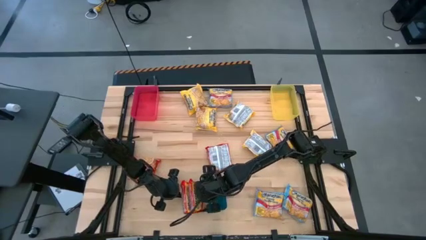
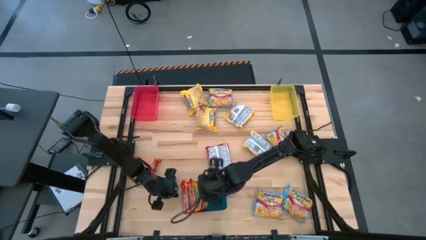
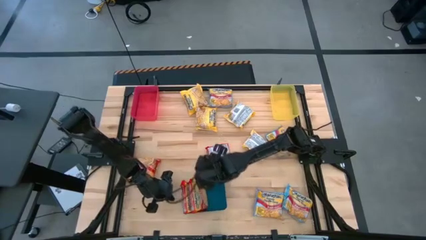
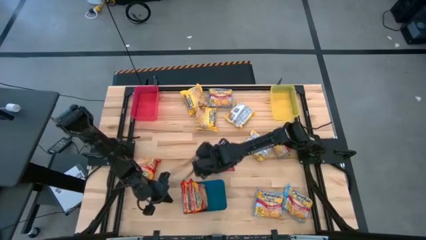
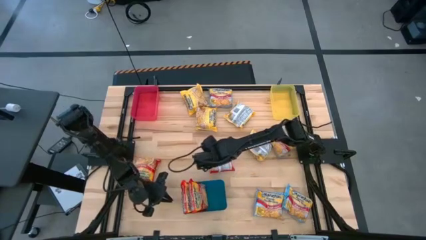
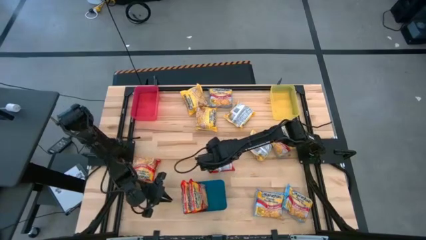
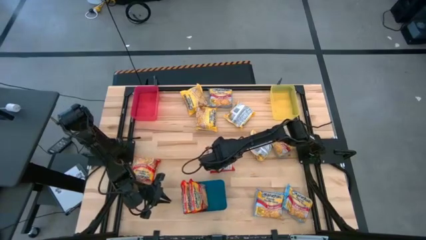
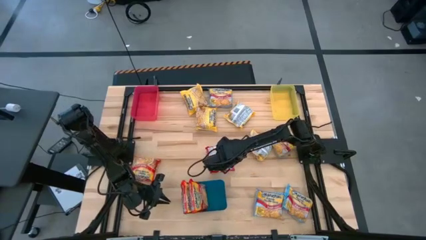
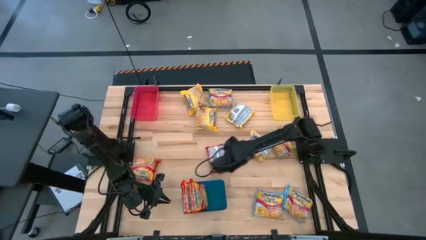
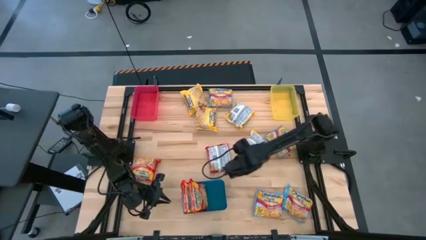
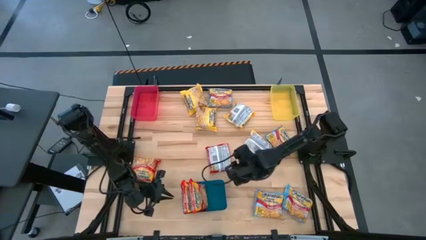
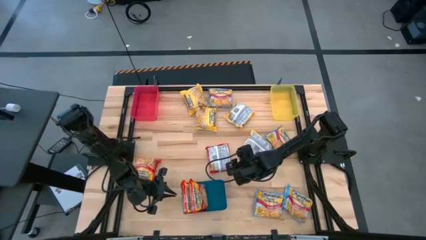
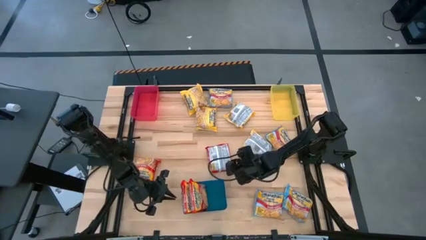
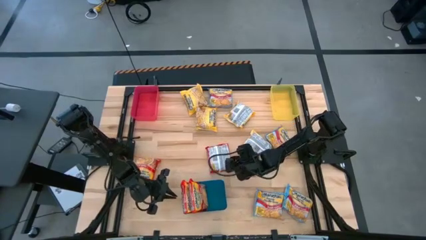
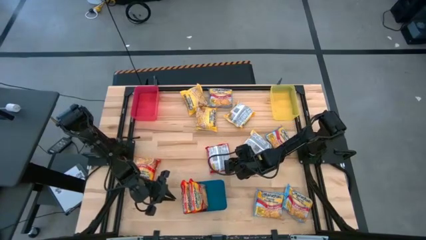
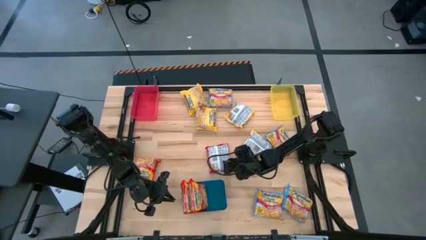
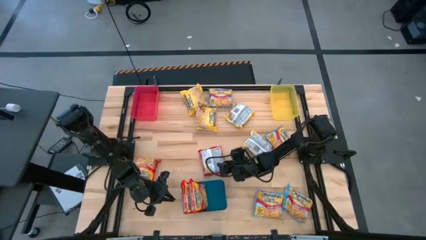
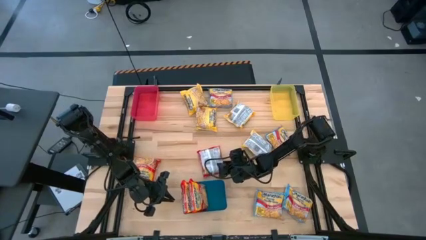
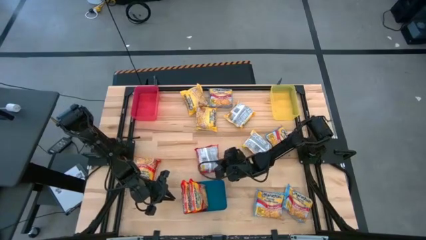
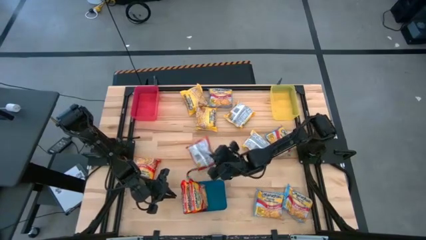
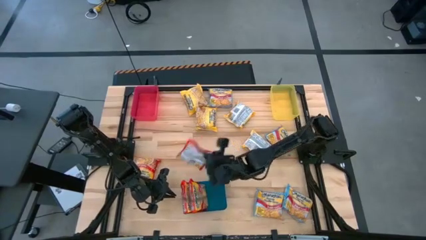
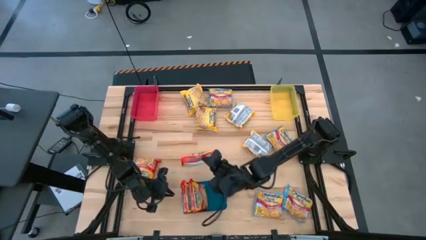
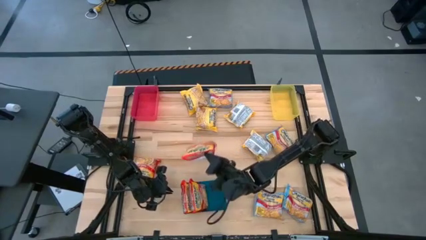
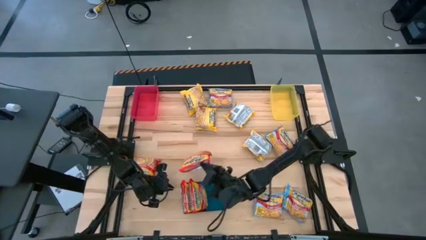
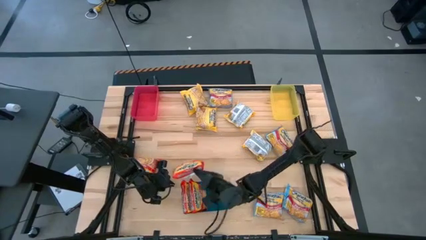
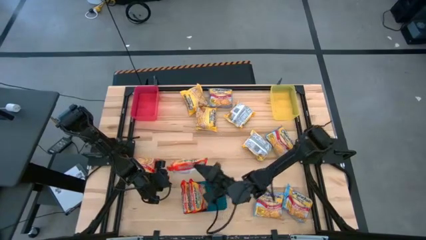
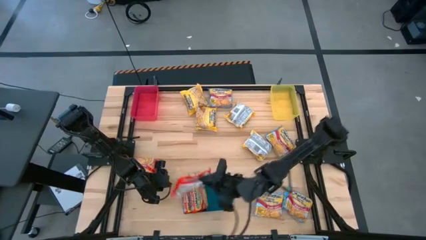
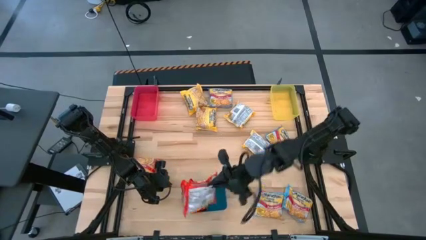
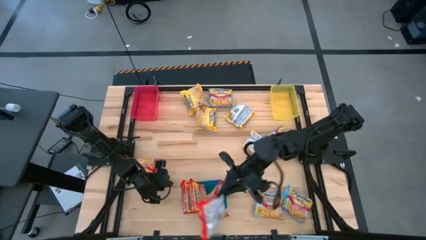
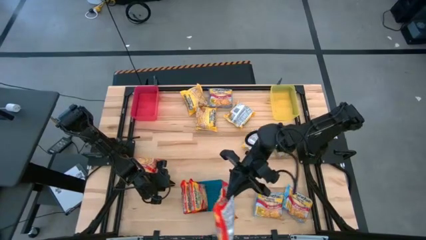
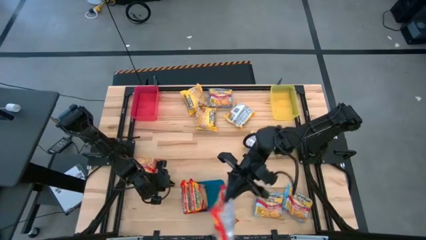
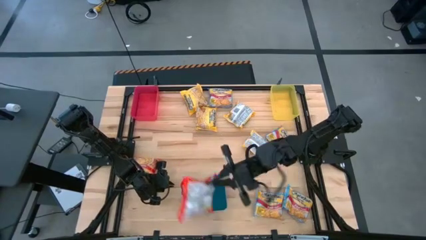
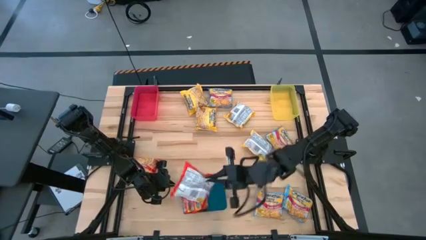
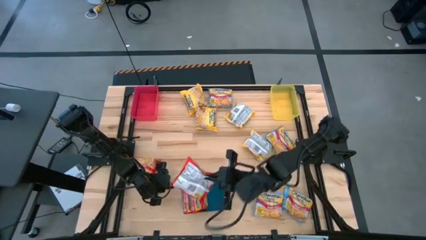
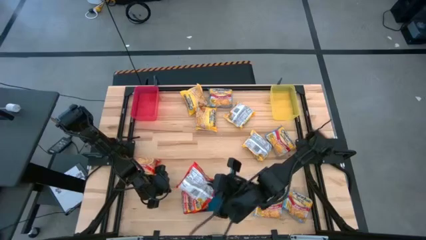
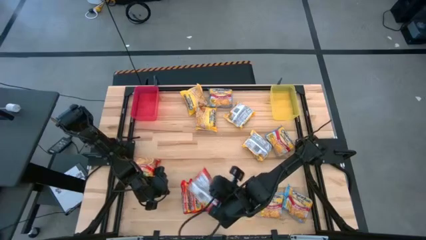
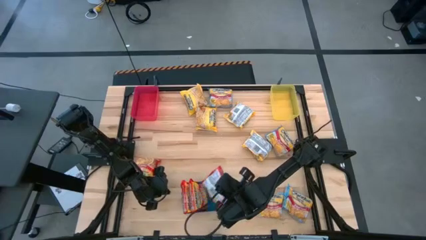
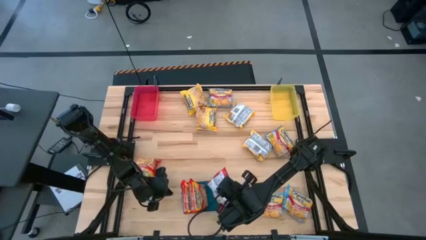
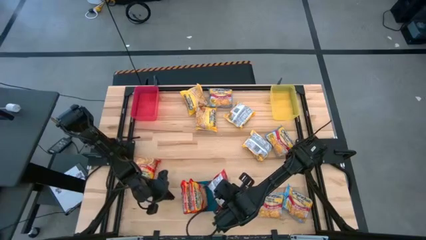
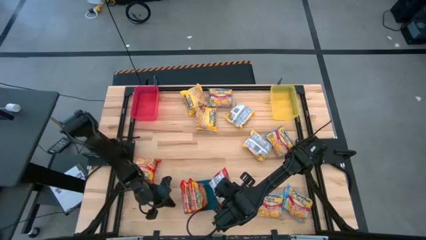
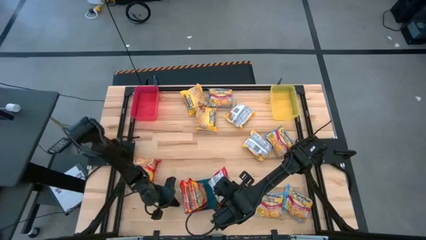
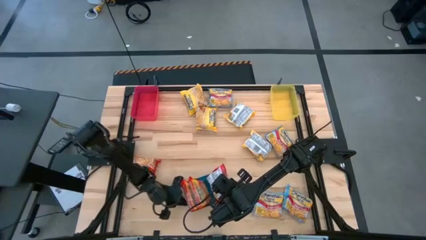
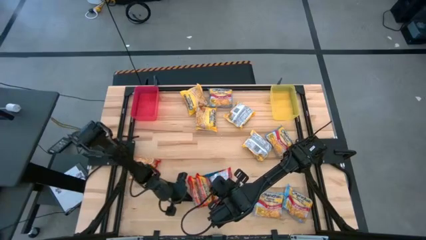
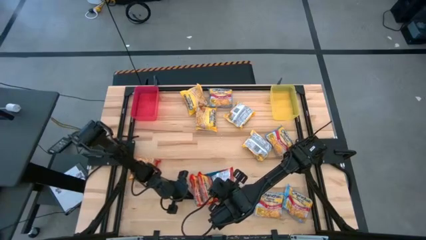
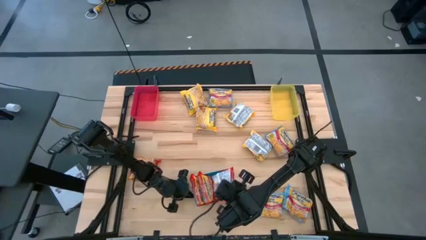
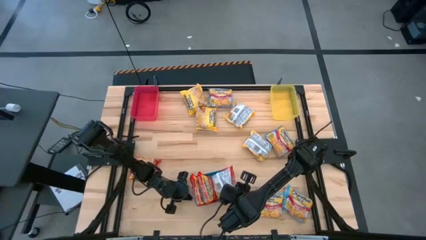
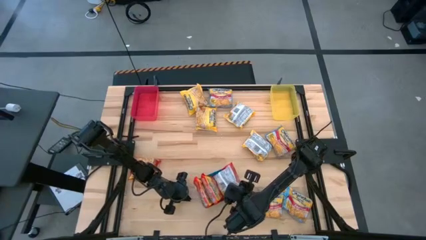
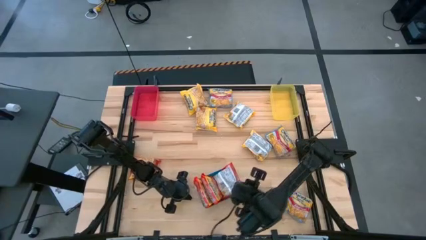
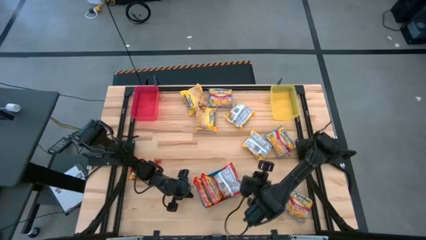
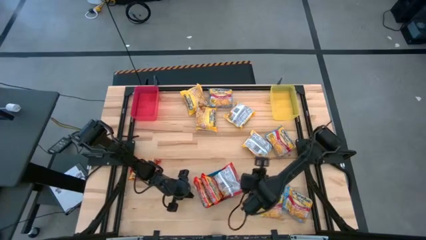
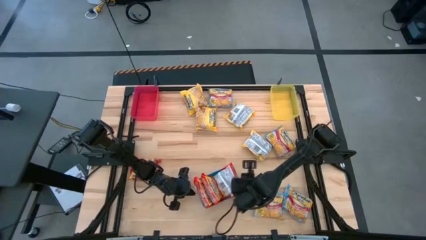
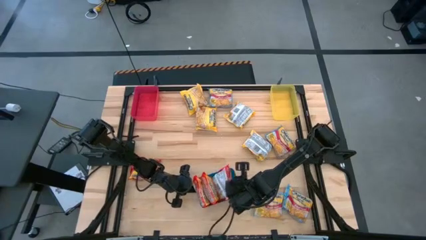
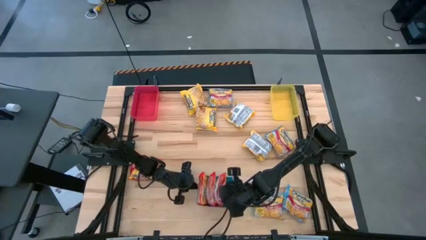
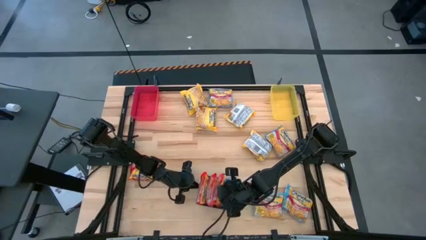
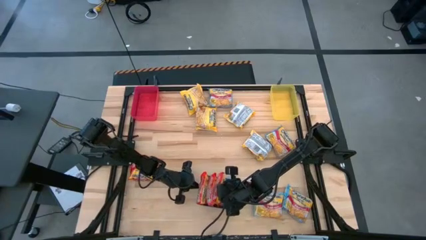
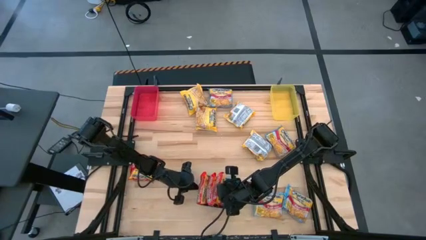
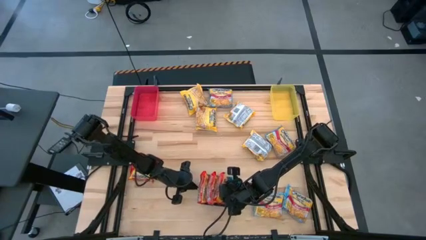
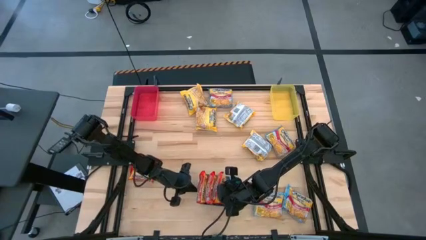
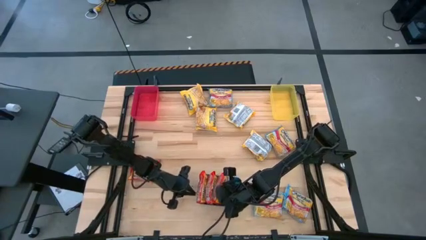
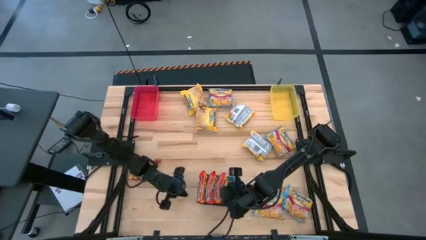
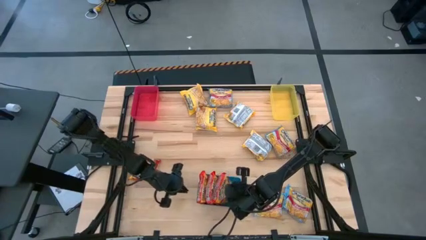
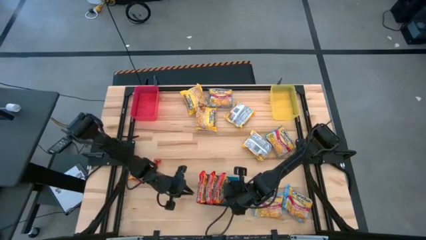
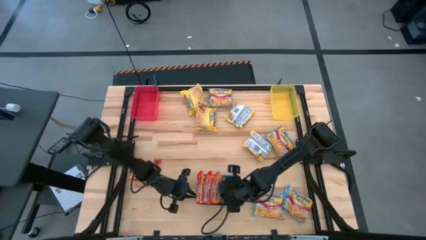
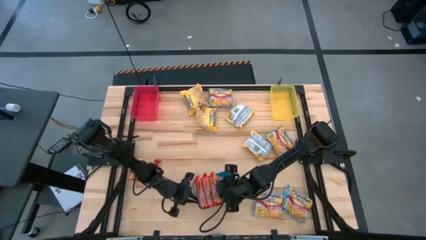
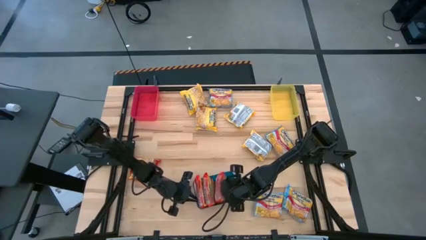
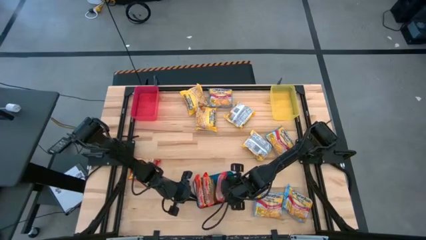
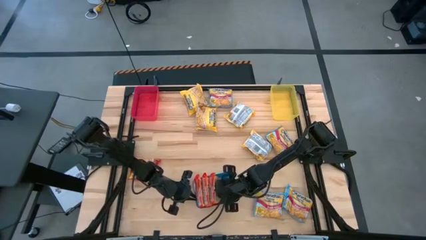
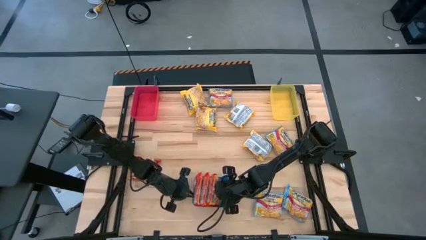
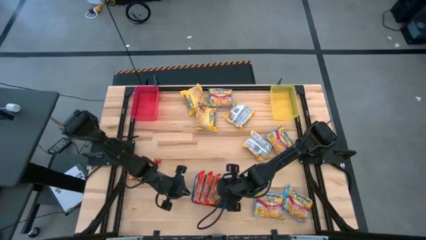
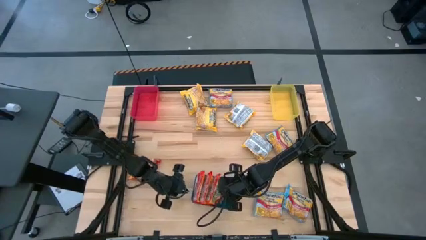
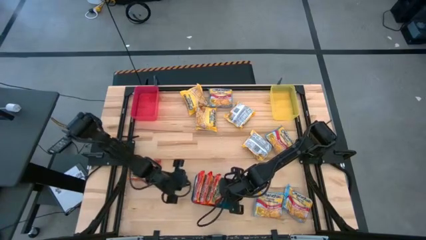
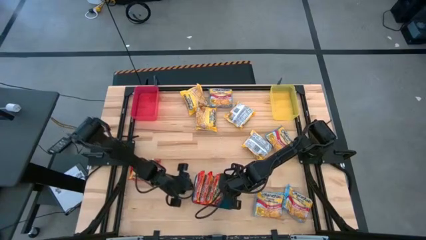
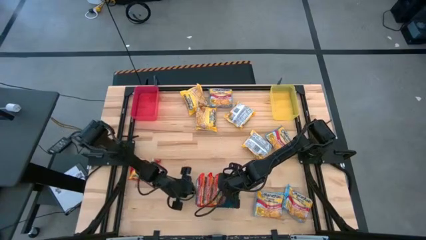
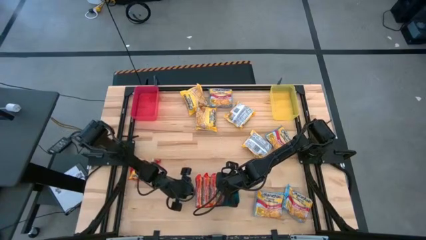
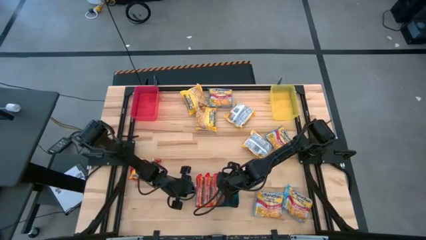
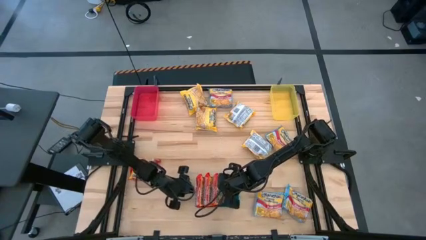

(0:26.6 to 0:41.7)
Task: Sort Maruchan noodles
Put the right red noodle pack into the blue bin
